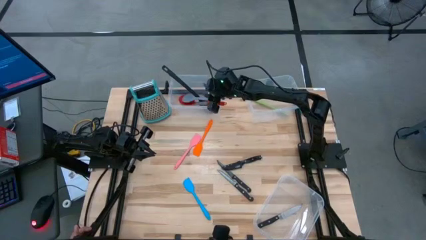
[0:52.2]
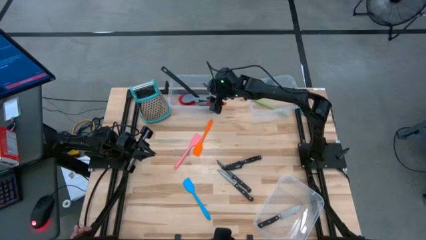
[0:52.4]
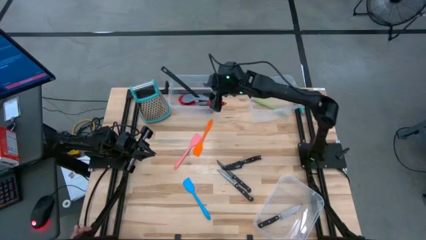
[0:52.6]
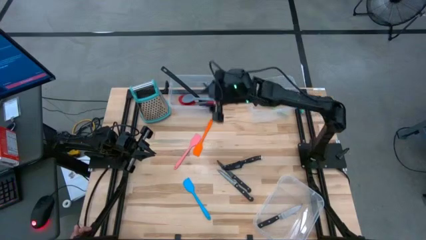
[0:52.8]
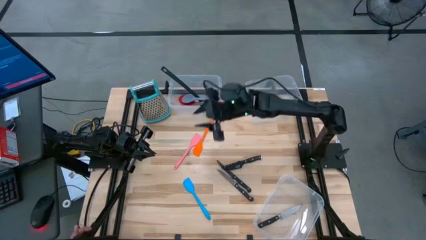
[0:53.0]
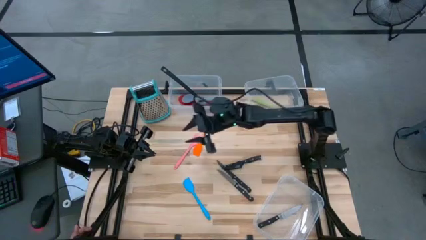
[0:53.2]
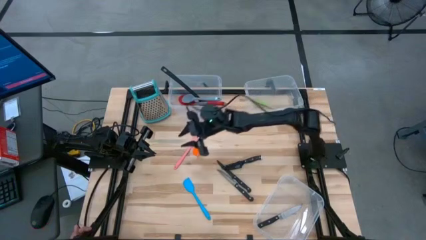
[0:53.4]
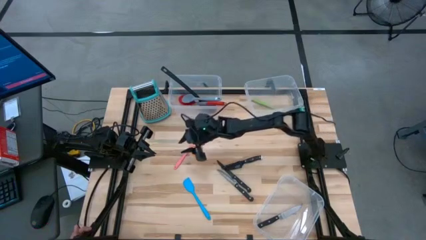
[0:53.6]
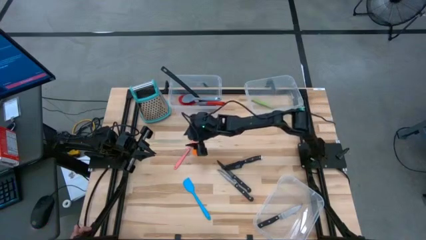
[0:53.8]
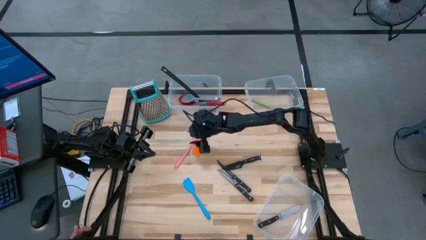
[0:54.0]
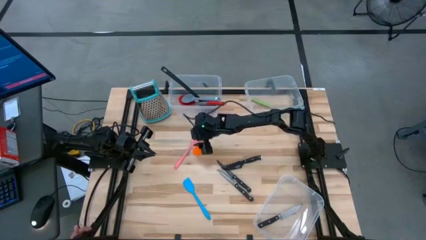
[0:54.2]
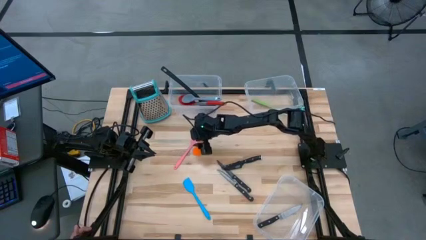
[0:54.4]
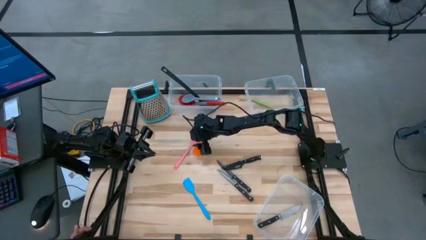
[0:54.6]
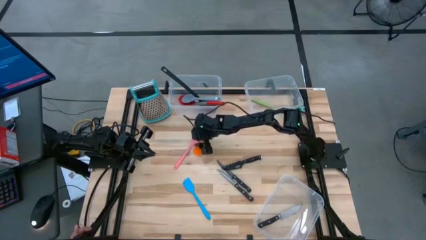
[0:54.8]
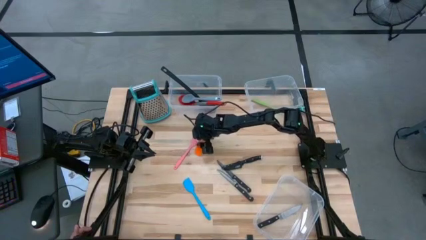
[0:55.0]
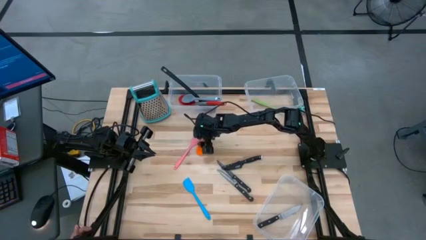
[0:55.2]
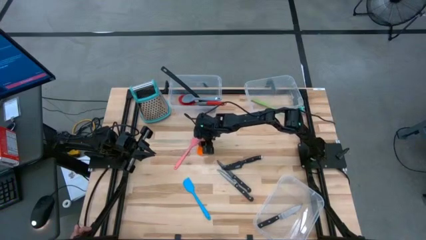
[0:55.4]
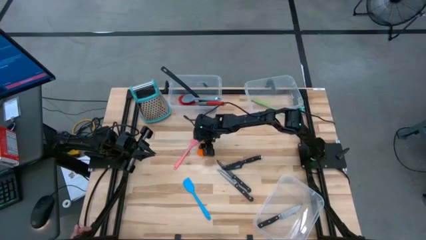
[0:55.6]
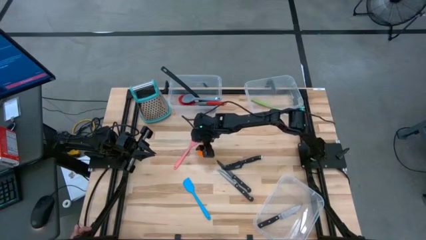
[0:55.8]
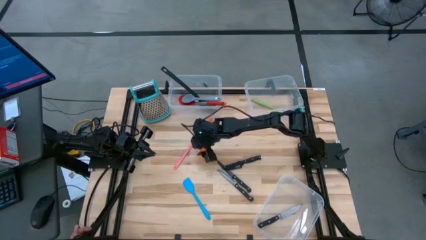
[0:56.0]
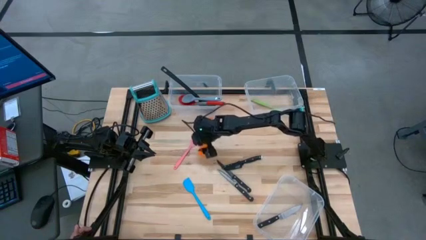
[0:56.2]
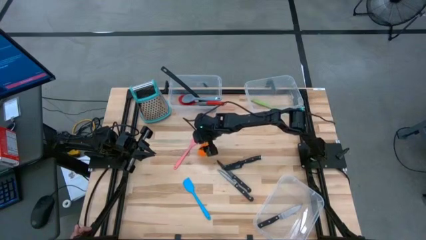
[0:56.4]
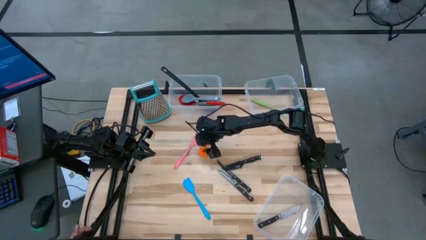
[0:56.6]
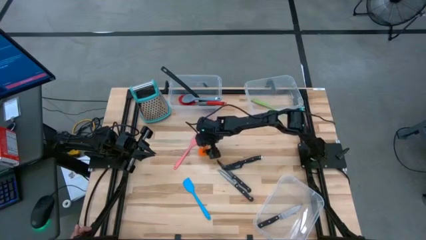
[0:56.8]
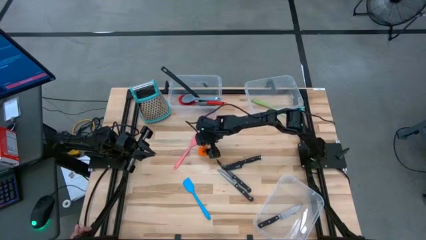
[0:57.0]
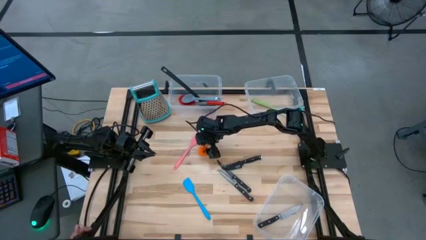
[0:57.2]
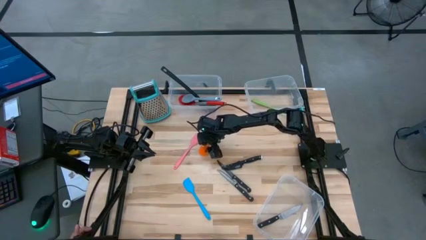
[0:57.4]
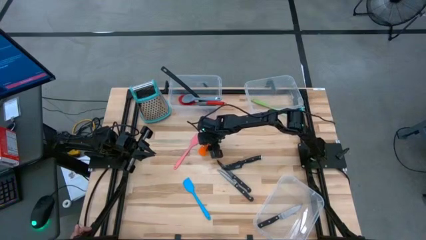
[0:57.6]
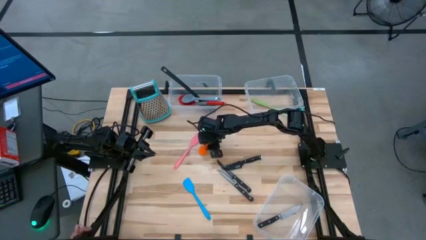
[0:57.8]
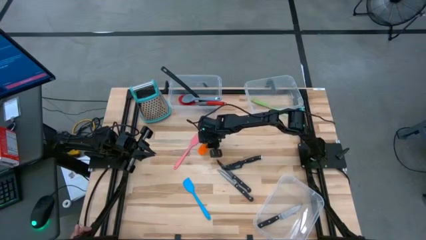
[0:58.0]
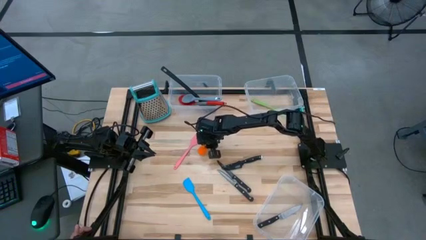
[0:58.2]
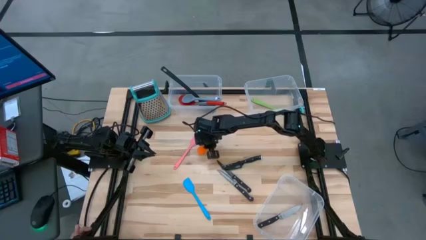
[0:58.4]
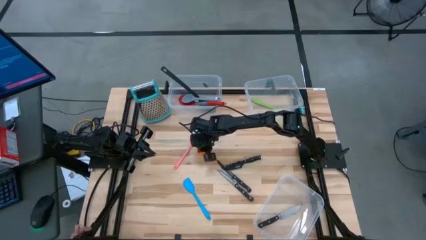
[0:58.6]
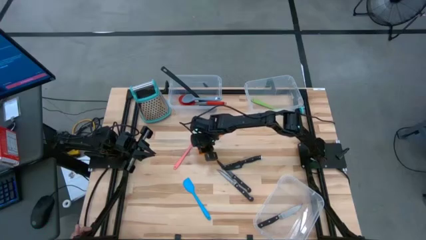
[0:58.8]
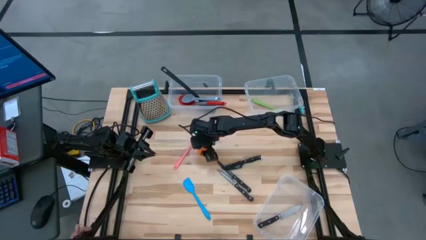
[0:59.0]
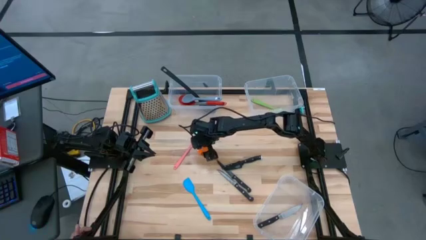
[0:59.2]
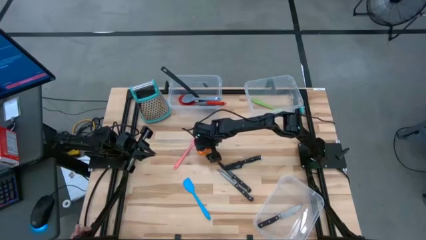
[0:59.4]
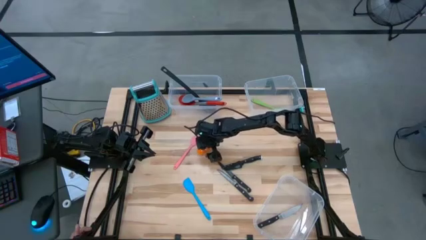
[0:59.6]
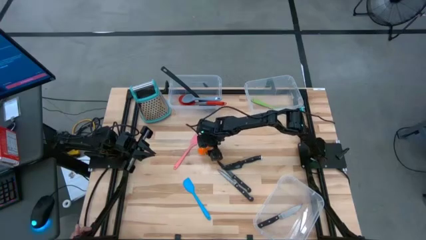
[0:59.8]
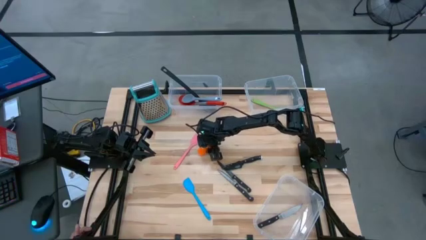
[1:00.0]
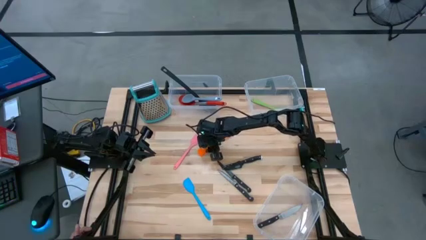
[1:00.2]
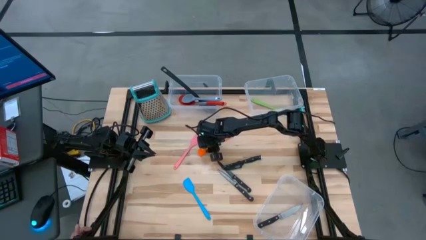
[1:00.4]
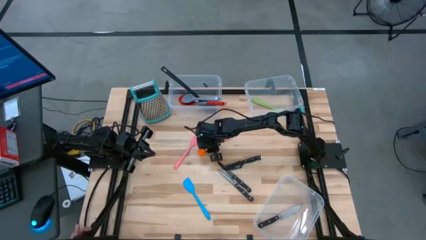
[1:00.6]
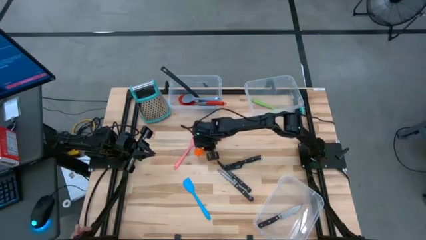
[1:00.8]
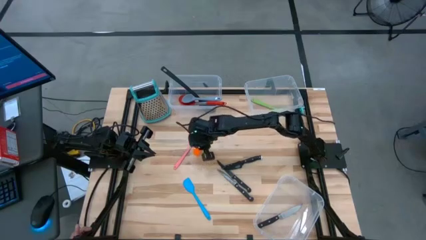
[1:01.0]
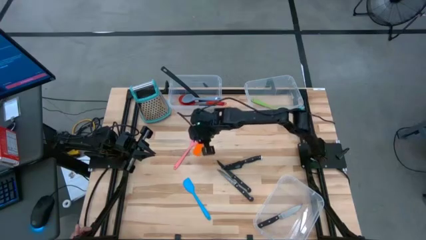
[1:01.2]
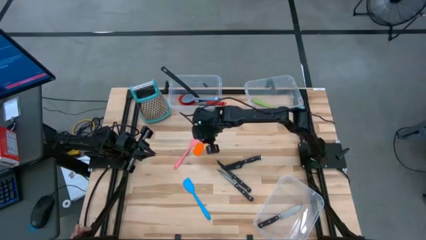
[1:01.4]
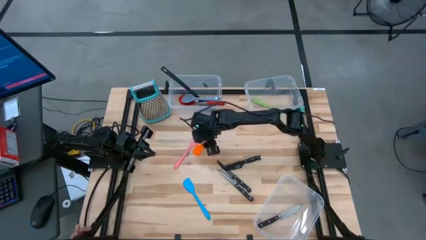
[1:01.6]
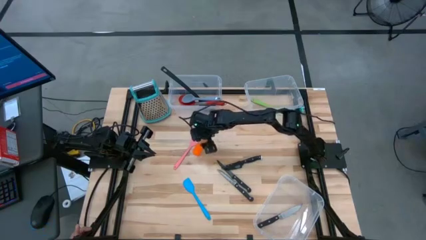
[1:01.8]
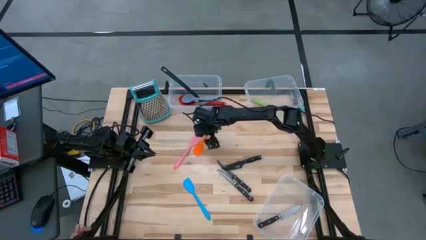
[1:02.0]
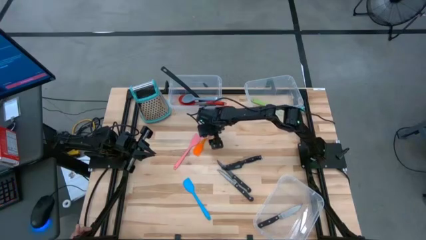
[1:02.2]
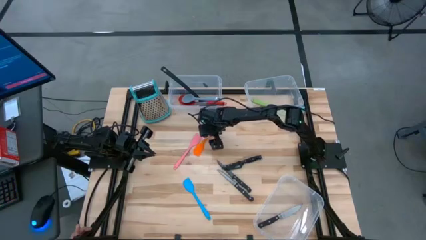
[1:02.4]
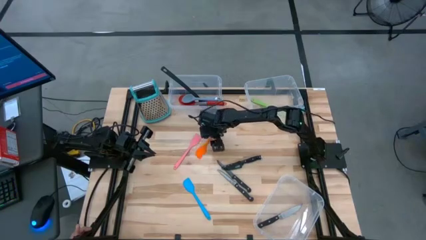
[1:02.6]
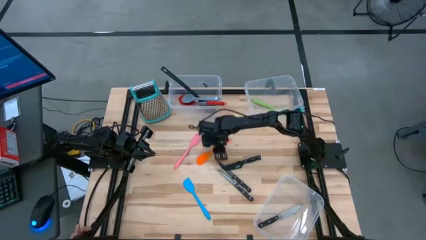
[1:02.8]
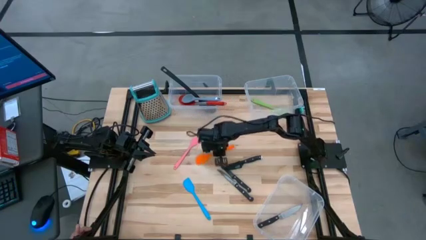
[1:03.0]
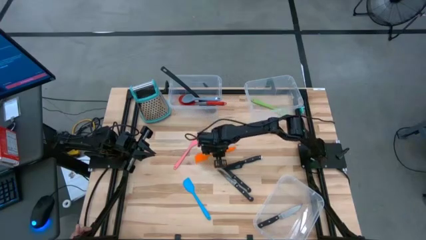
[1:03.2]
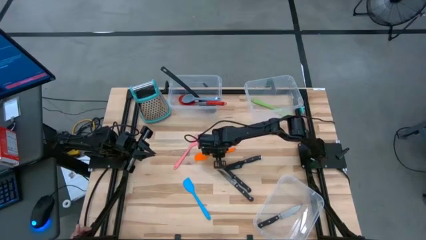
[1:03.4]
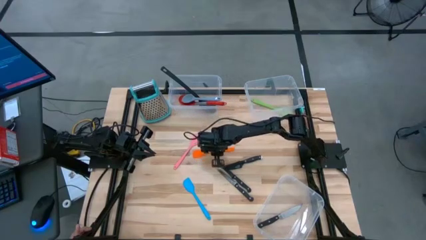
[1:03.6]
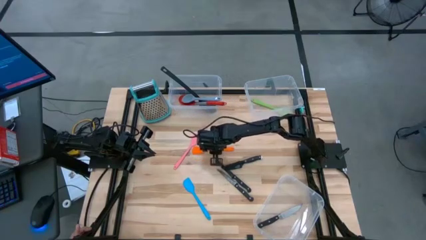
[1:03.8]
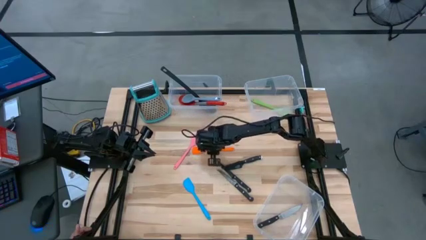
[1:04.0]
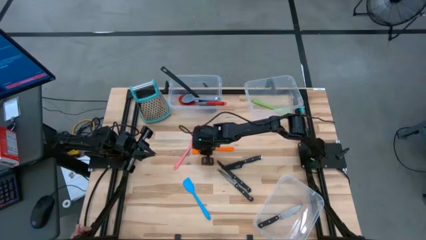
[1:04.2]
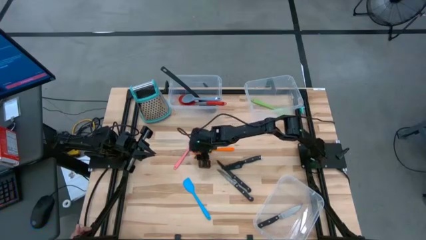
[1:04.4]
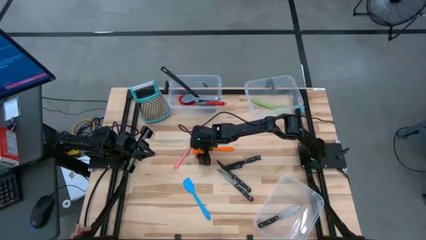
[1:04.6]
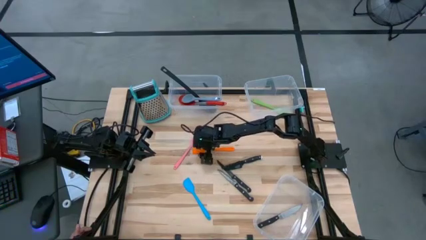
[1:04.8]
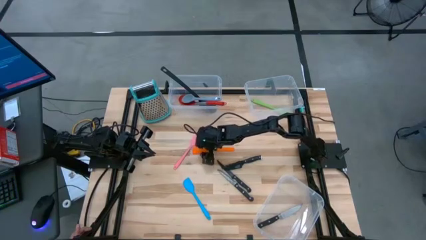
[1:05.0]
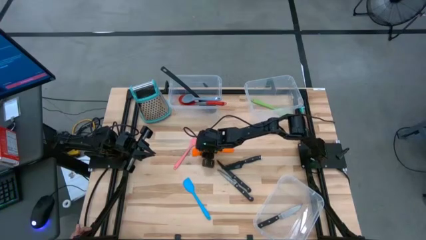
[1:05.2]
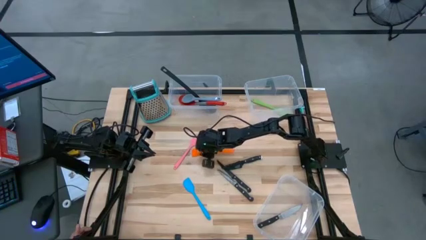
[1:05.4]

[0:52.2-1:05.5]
Task: Pick & Place Kitchen Items
Put the top right orange spatula into the top right transparent bin

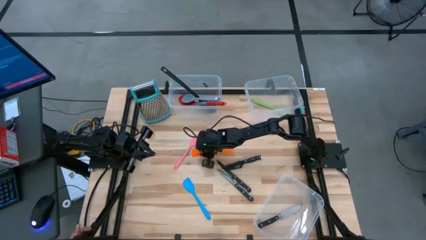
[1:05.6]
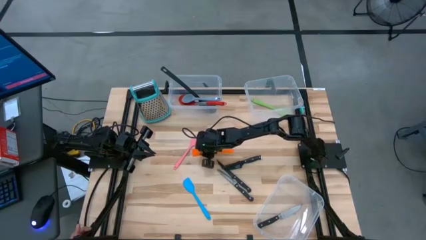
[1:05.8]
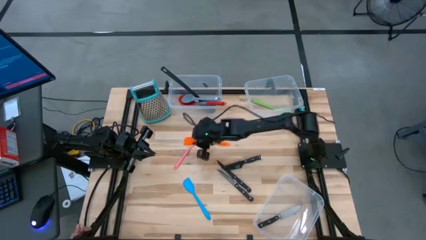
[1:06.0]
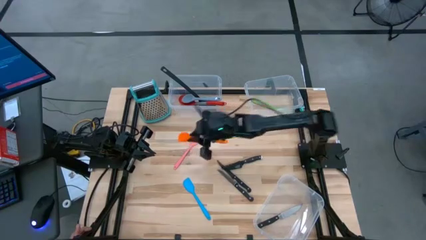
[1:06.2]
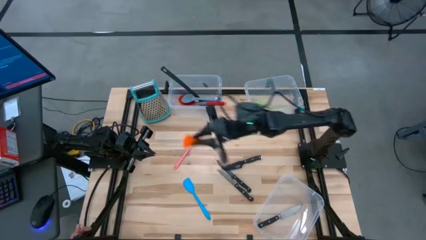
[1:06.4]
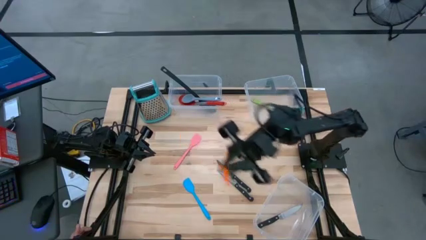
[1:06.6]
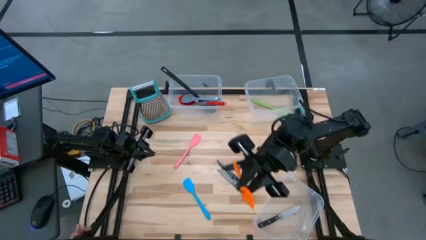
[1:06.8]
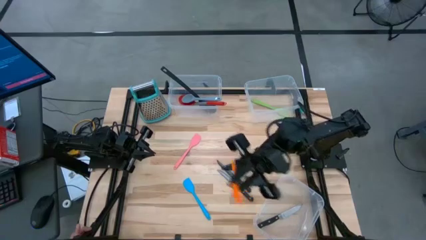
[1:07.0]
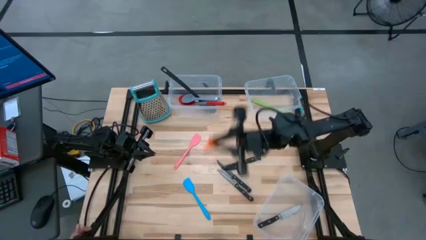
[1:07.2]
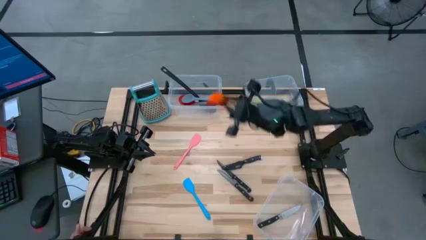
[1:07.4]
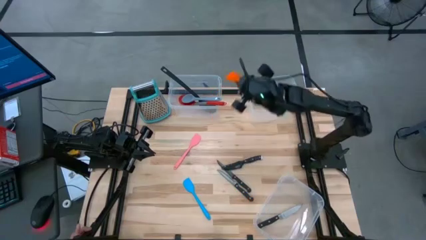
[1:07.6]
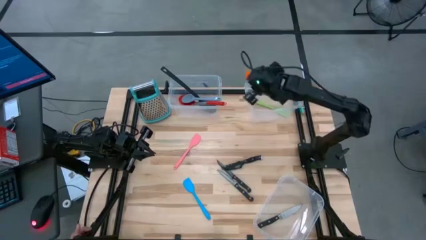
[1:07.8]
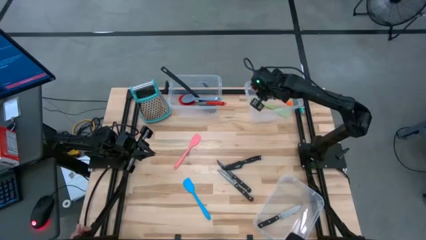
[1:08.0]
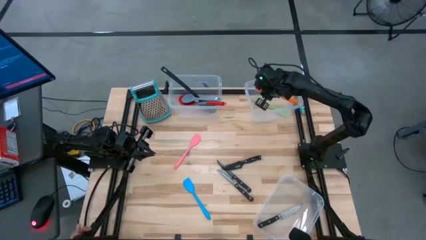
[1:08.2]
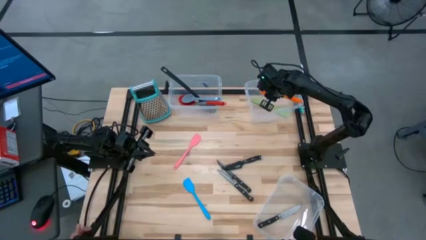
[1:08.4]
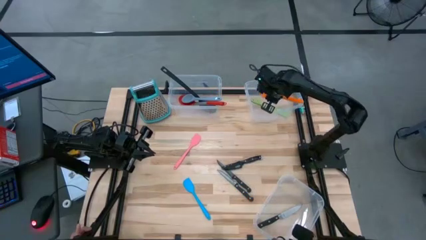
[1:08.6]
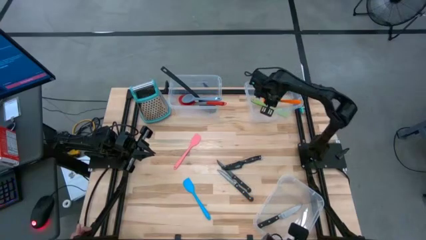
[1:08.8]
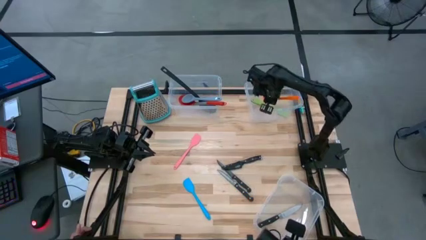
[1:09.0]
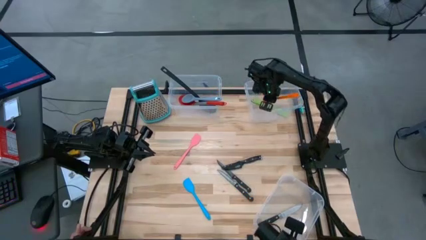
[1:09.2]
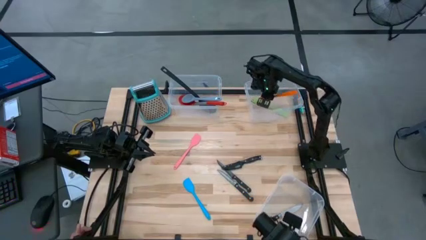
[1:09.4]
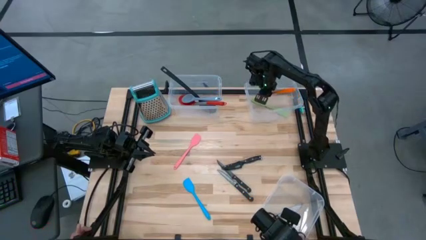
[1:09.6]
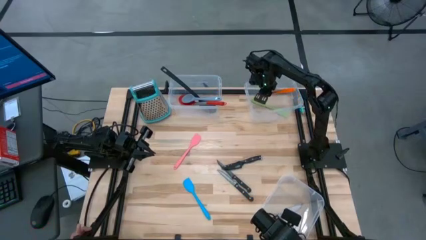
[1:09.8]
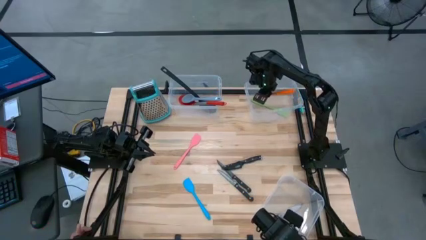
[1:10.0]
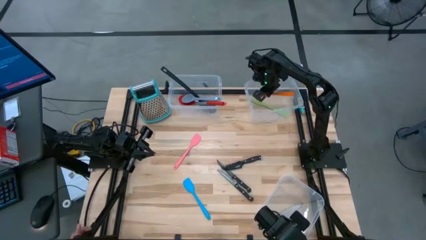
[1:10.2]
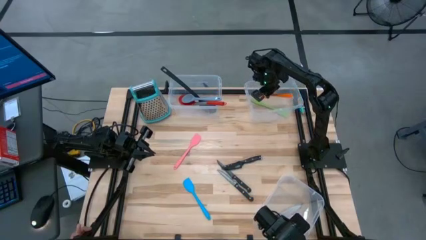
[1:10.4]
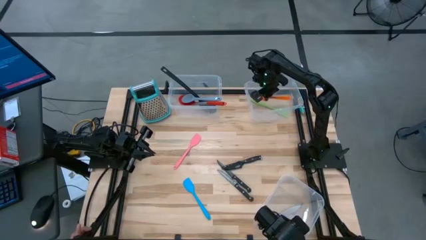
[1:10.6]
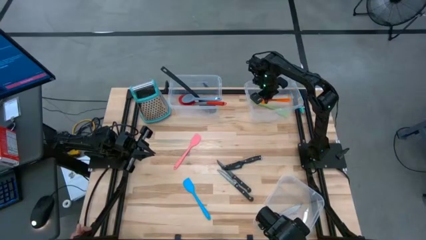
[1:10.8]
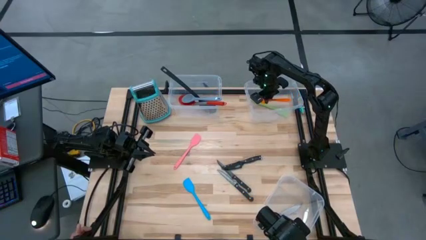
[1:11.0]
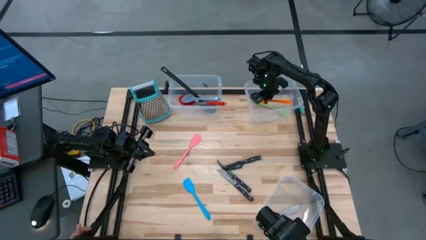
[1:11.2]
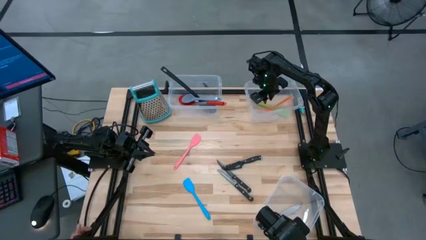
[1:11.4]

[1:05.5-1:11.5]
Put the top right orange spatula into the top right transparent bin
